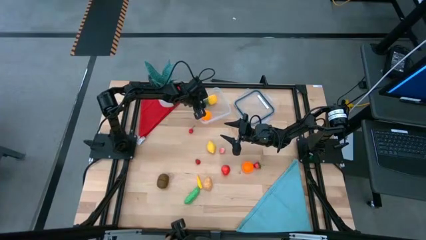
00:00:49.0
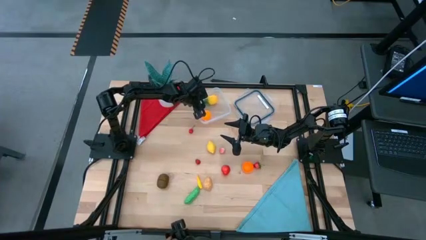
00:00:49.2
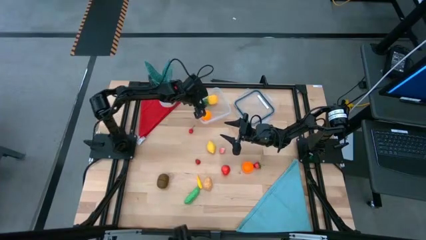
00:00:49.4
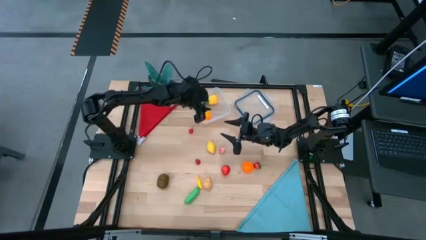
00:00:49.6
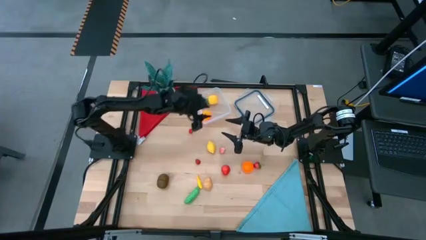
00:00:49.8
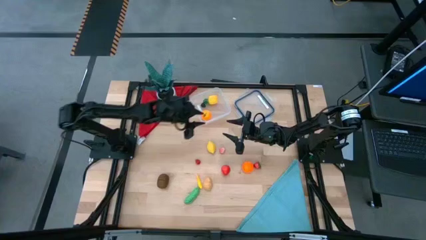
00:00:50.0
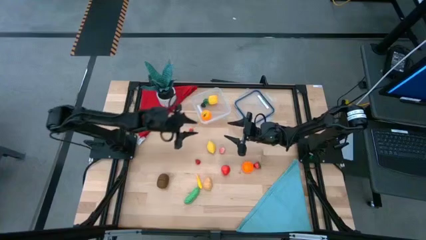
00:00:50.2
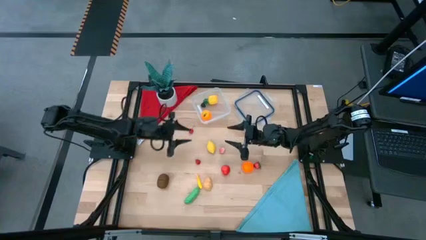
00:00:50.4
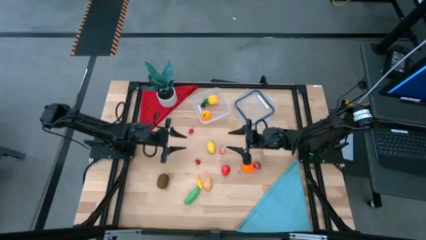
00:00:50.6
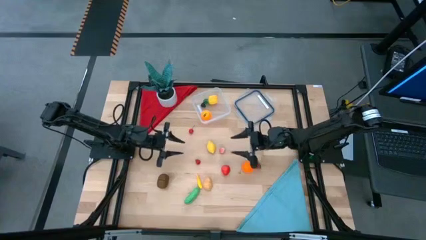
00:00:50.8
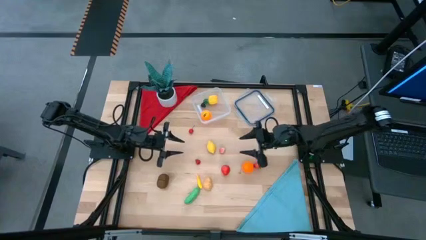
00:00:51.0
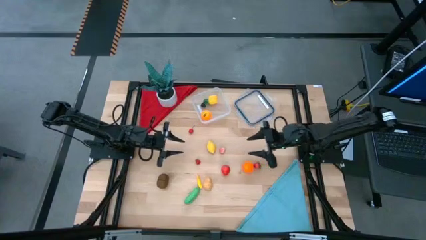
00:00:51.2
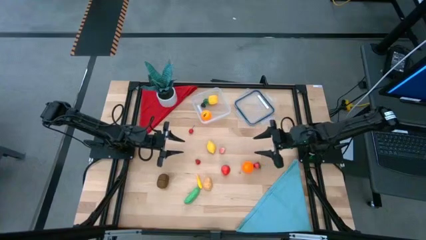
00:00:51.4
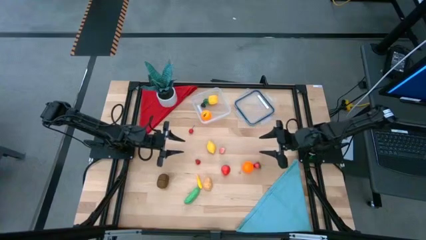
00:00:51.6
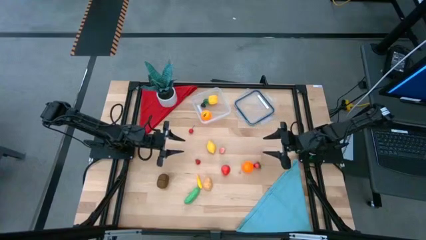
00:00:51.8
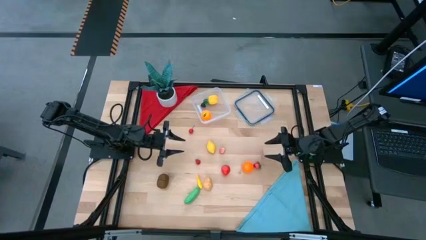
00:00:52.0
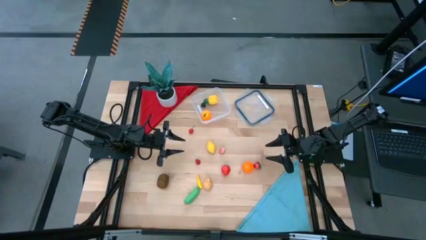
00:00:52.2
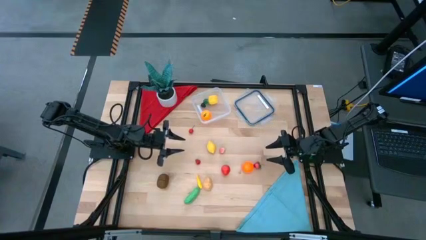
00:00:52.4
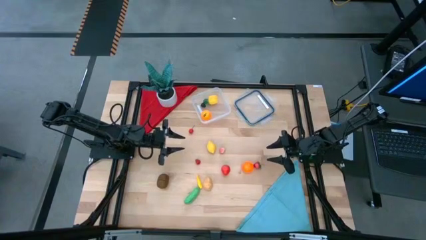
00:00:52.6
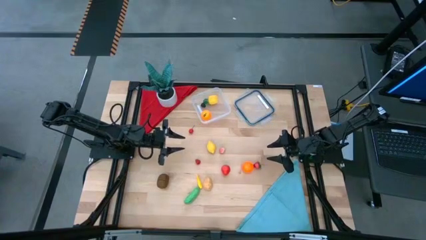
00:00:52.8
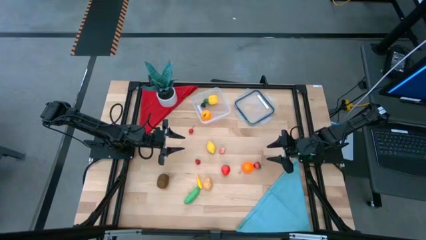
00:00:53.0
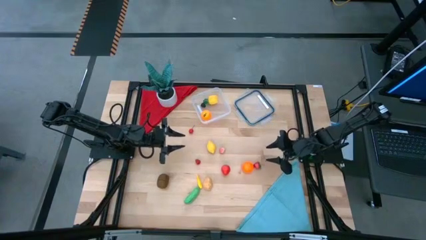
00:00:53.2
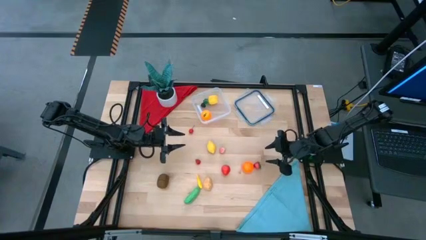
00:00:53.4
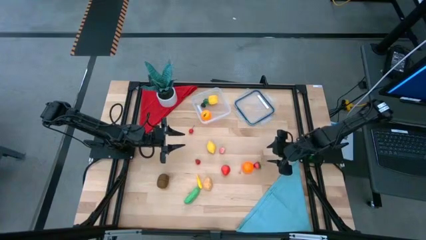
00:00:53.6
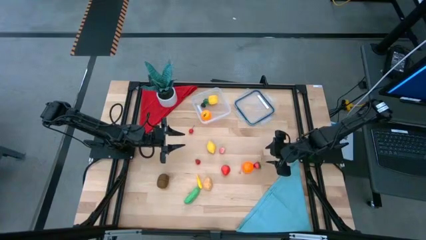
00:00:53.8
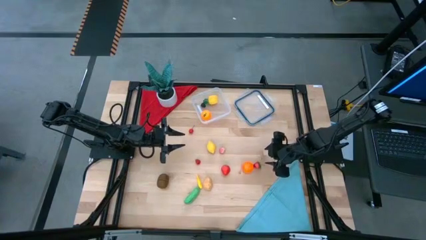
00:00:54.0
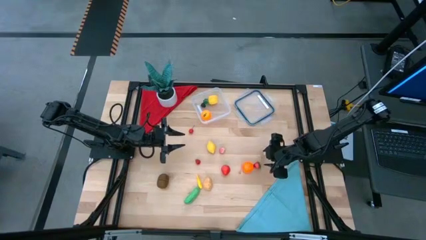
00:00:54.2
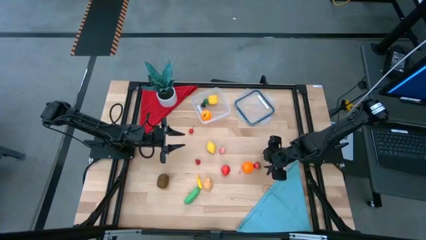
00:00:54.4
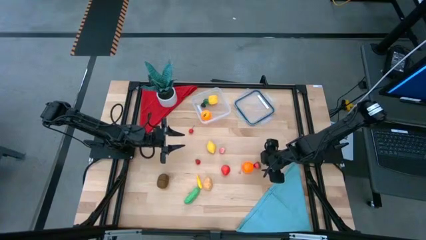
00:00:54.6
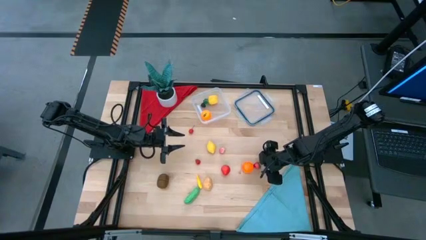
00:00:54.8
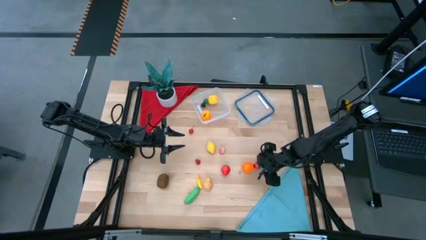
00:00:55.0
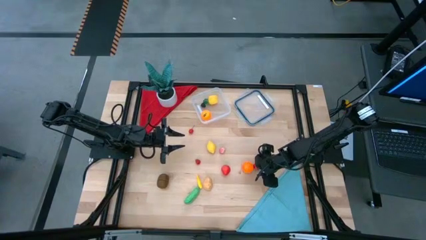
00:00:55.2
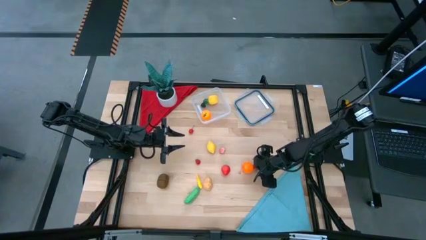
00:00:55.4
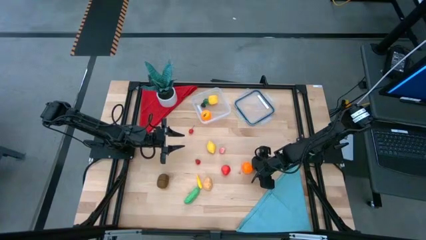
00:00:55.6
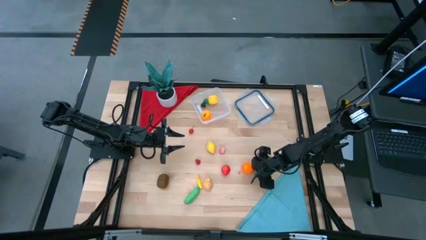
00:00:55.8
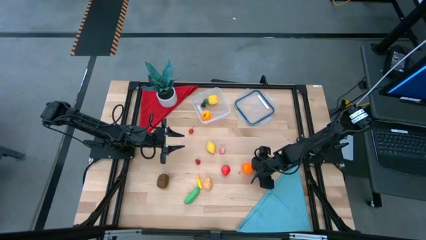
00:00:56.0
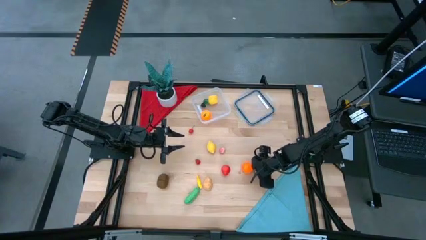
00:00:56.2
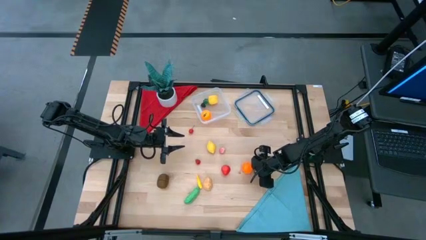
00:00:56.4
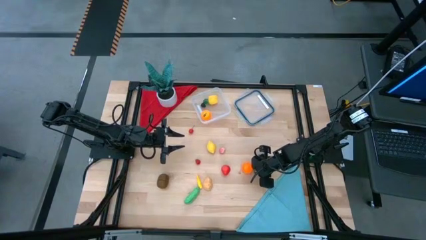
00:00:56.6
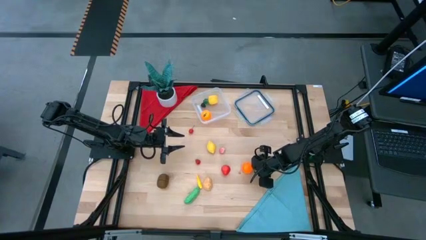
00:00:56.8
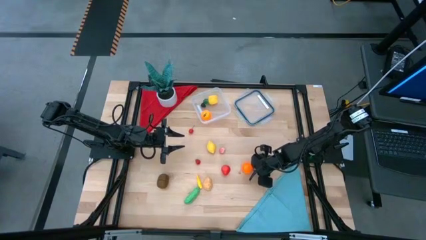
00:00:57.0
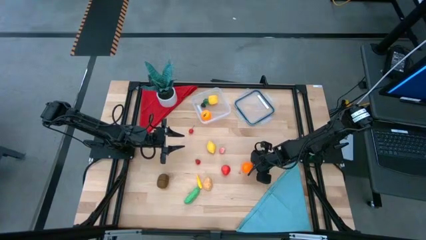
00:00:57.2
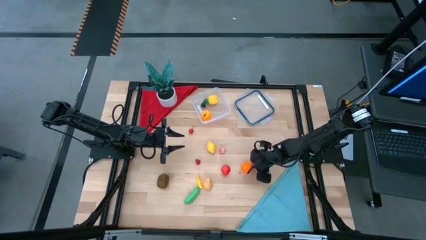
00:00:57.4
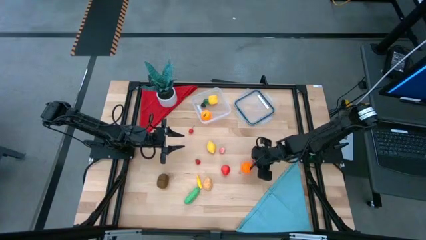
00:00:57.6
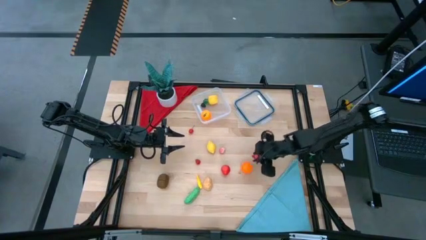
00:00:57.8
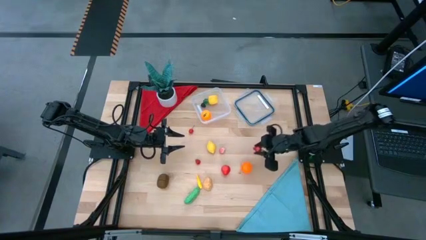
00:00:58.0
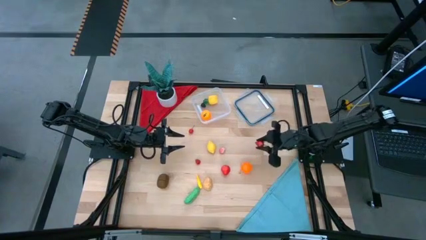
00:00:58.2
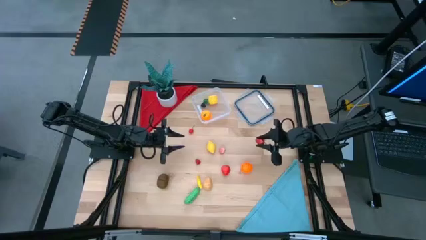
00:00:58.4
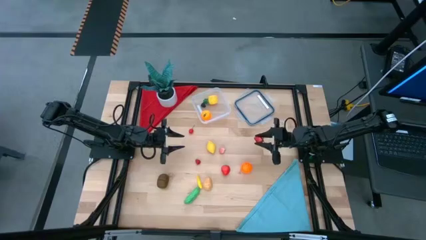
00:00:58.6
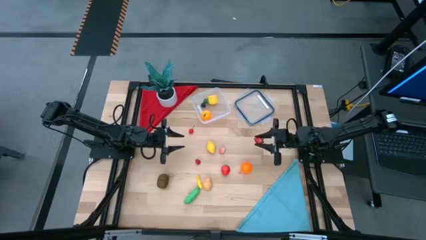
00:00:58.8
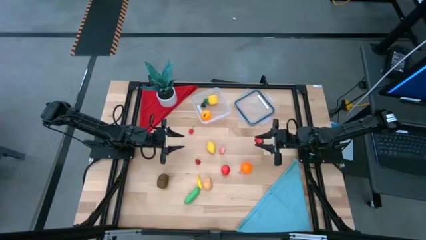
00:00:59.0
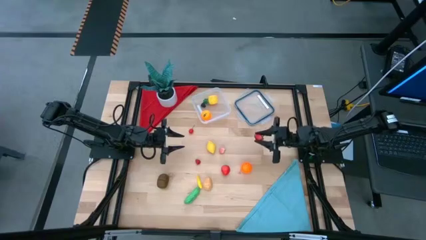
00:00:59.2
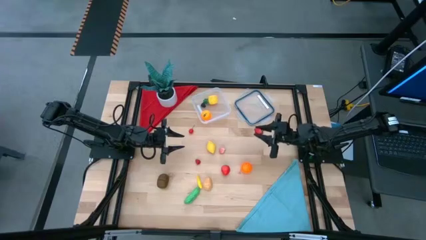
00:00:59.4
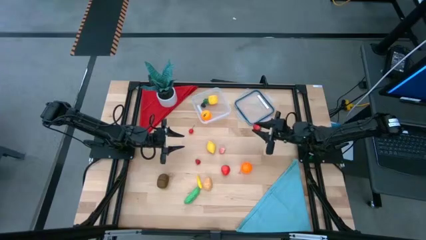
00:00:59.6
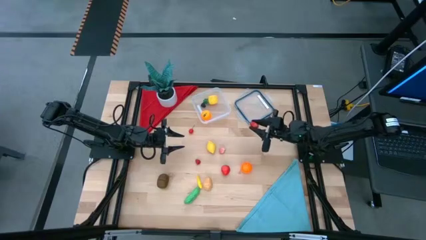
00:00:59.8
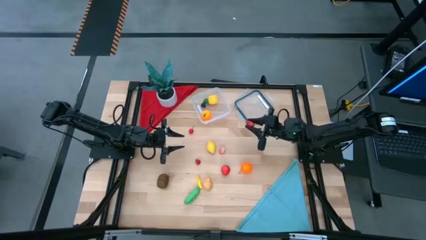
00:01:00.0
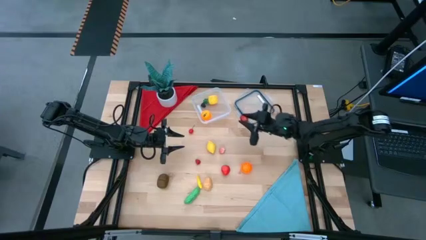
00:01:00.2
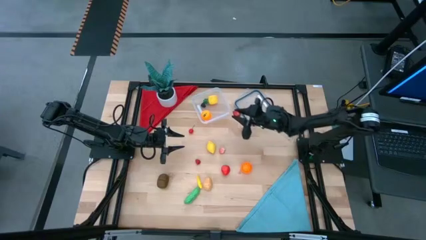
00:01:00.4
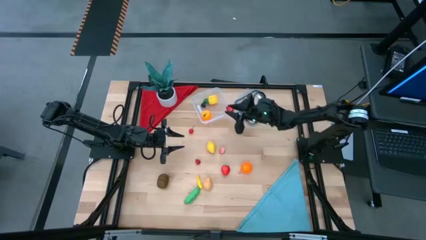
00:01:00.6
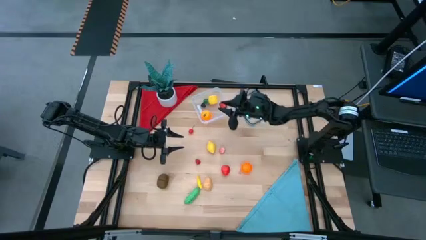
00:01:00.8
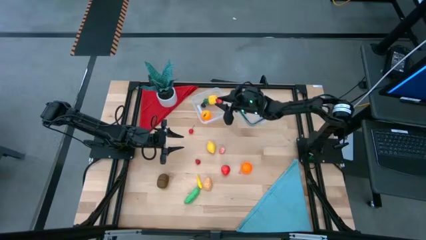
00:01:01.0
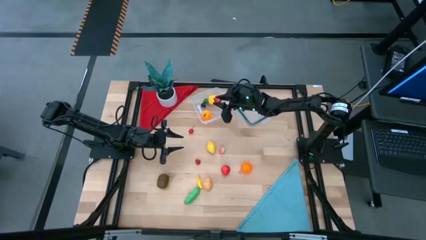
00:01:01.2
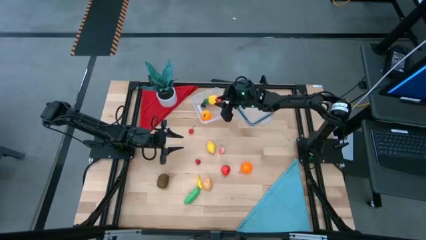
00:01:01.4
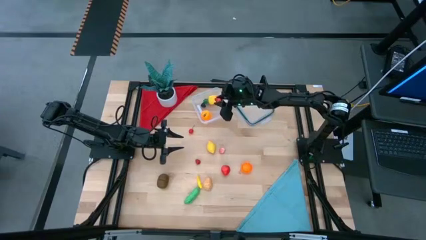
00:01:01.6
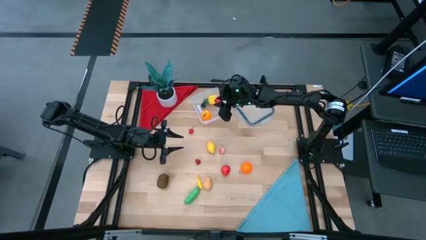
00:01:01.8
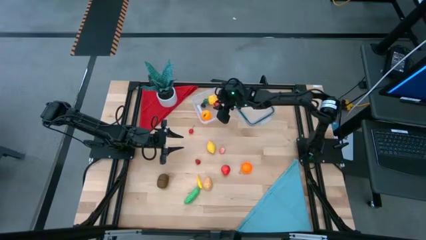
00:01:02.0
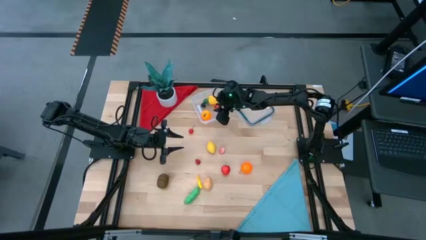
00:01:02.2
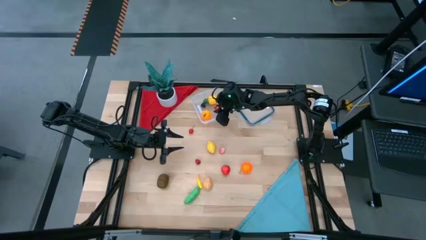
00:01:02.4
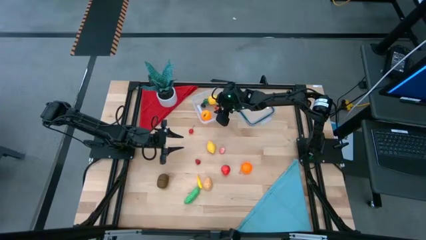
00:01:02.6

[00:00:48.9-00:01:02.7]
Task: Pick and placing Produce into tupperware
Put the right red strawberry into the transparent container

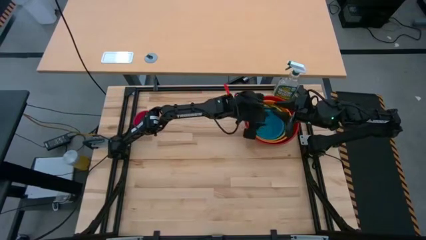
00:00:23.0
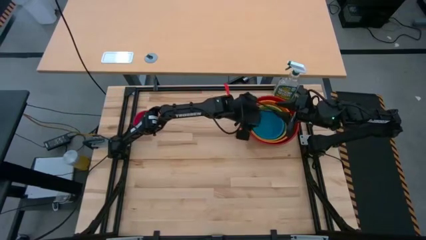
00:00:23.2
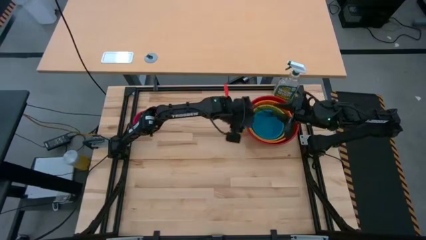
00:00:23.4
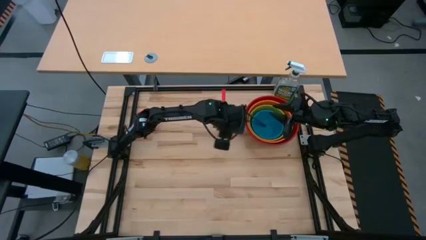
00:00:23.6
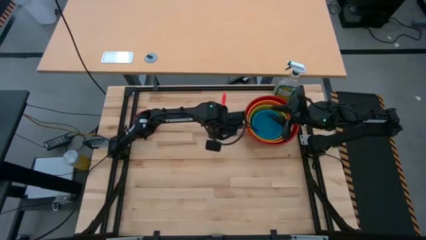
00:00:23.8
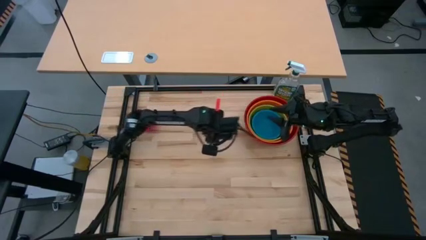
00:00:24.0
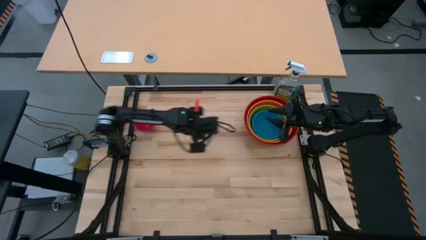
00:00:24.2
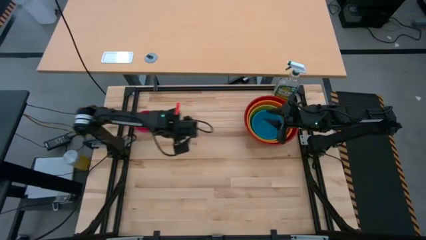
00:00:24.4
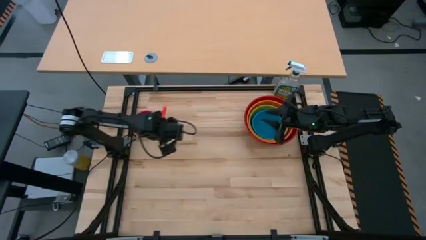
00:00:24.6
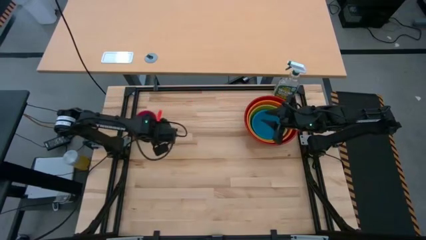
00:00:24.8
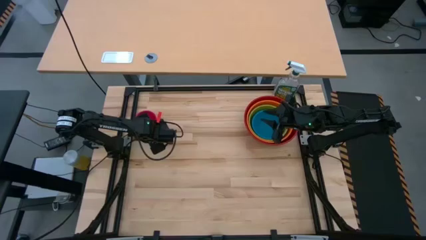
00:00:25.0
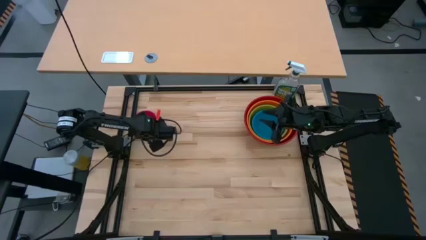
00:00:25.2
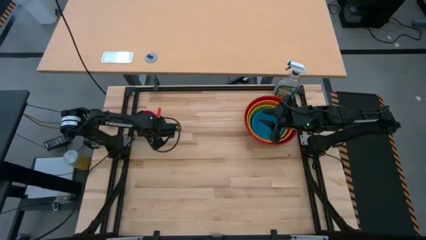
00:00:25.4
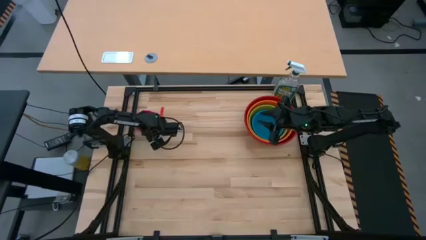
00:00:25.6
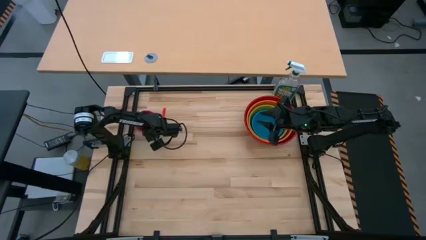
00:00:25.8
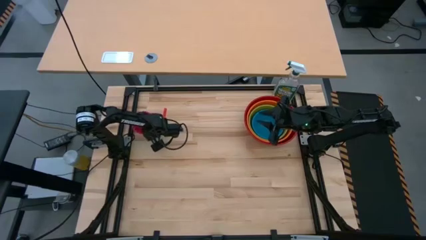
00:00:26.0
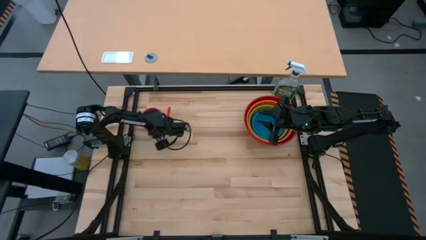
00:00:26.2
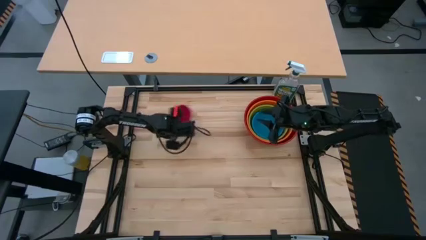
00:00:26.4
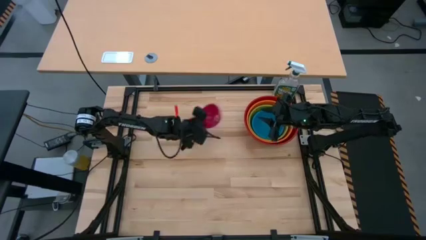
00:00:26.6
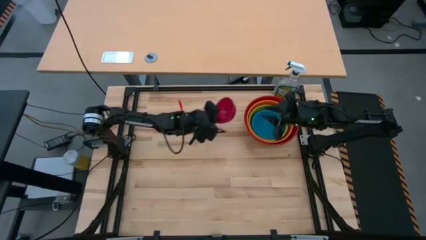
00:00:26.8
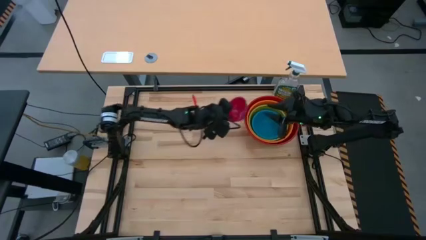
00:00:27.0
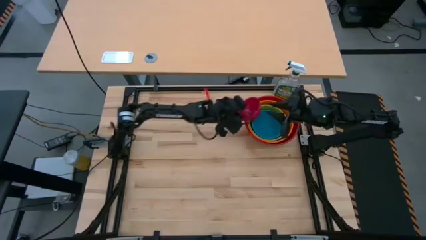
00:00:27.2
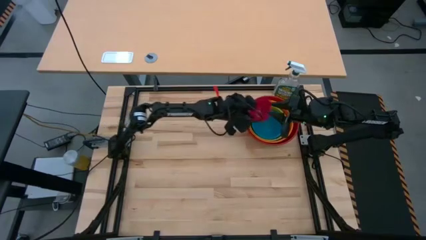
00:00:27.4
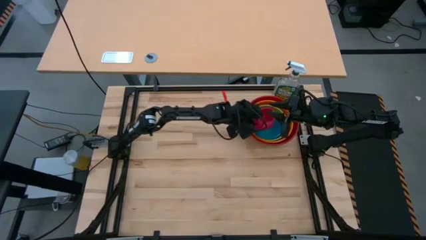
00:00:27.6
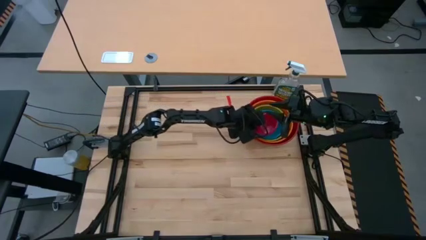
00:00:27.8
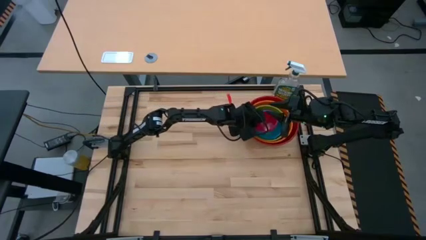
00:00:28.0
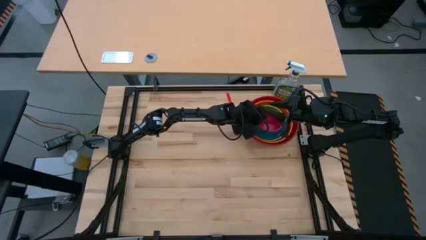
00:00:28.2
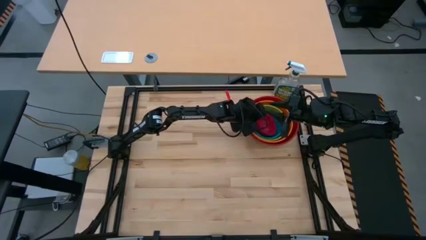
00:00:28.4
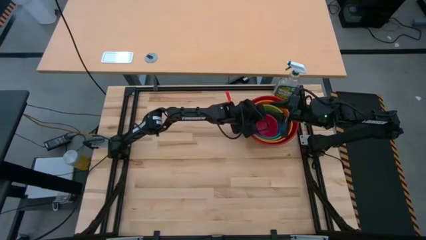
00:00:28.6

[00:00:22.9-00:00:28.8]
Task: Nest bowls inside each other by size order
Stack the pink bowl on top of the blue bowl
